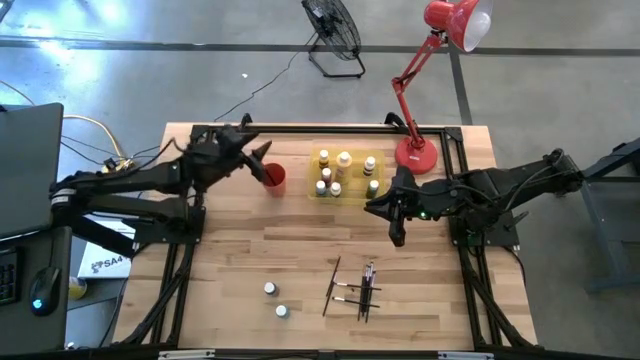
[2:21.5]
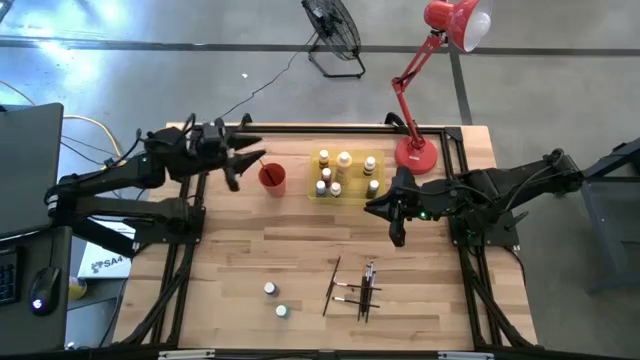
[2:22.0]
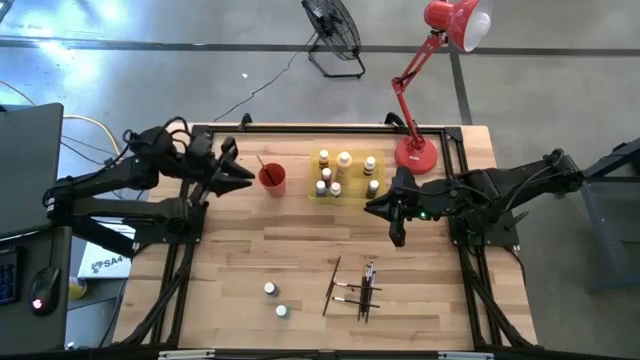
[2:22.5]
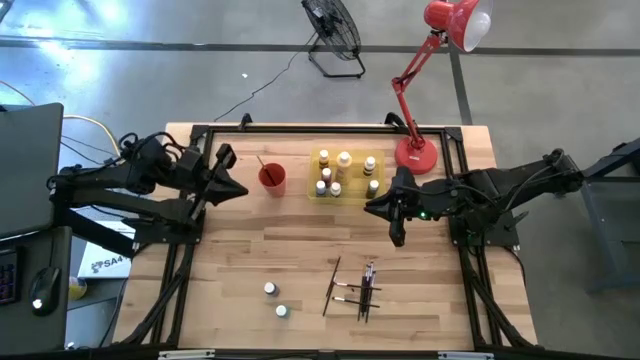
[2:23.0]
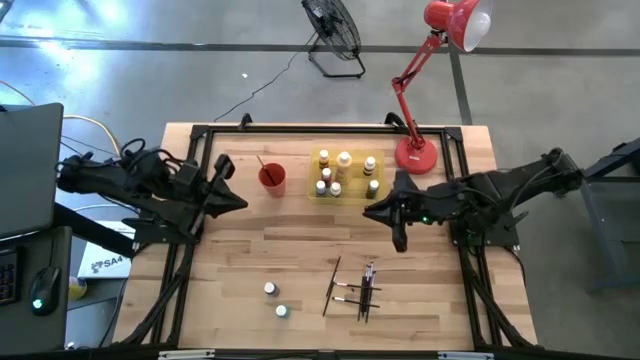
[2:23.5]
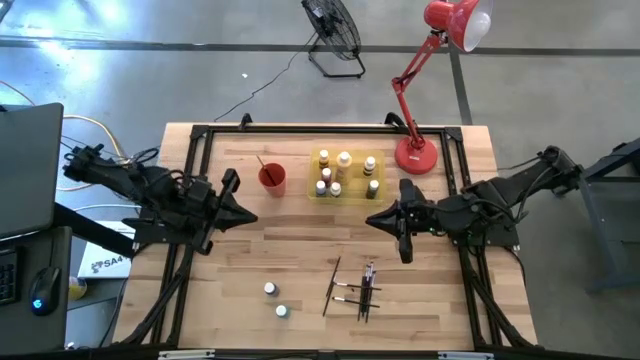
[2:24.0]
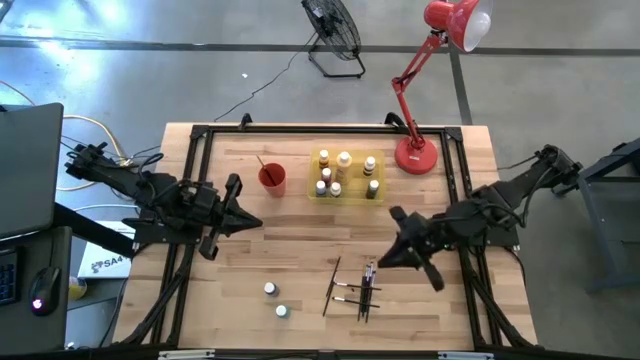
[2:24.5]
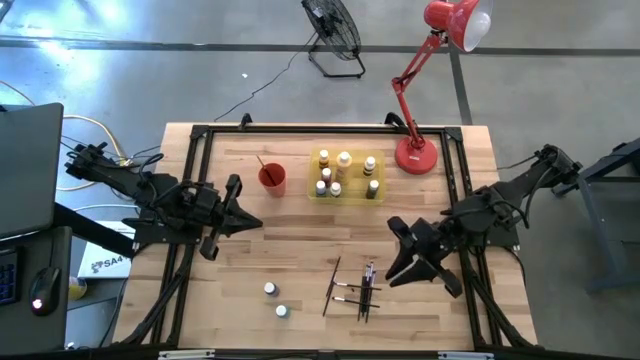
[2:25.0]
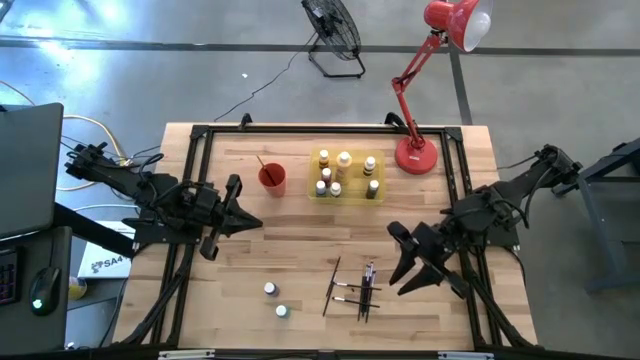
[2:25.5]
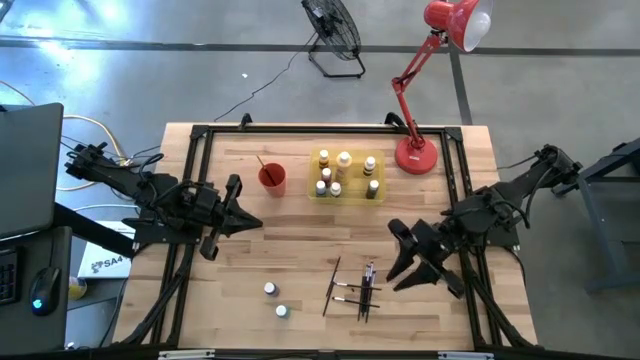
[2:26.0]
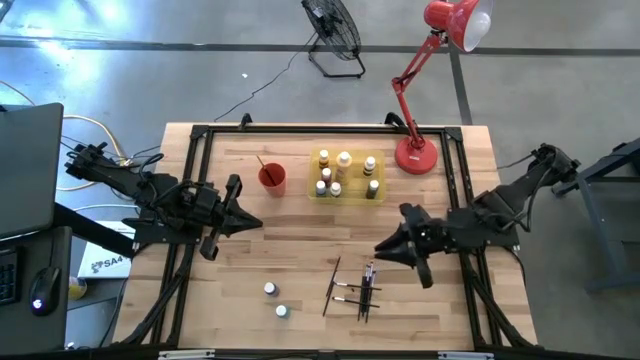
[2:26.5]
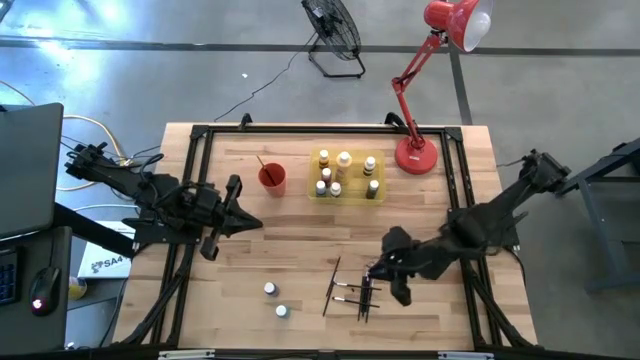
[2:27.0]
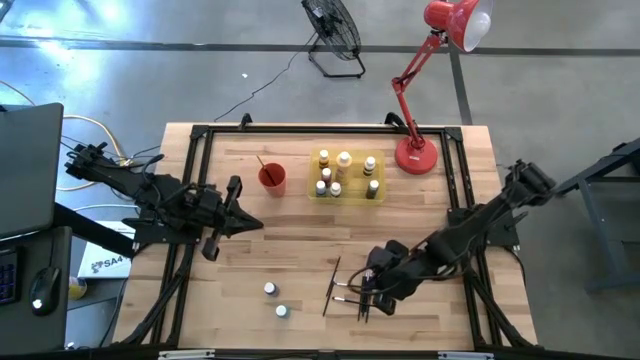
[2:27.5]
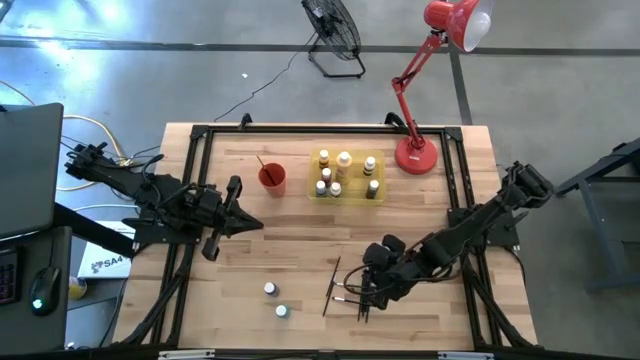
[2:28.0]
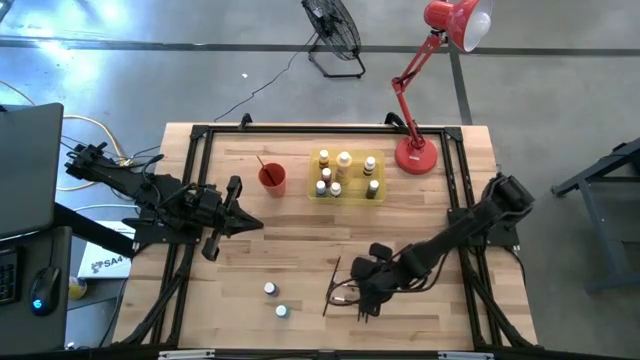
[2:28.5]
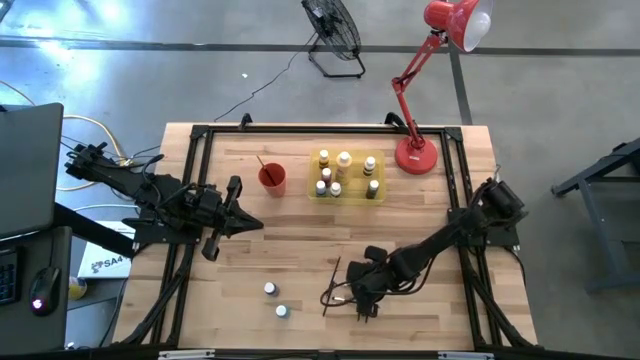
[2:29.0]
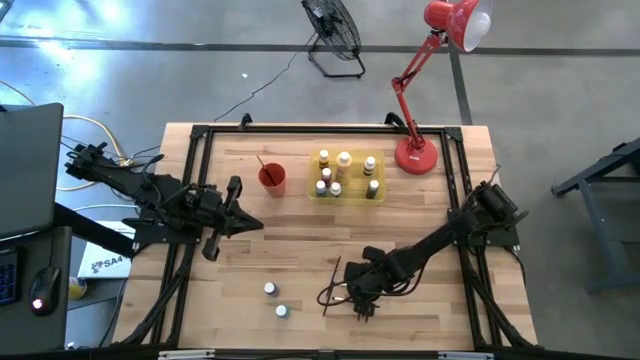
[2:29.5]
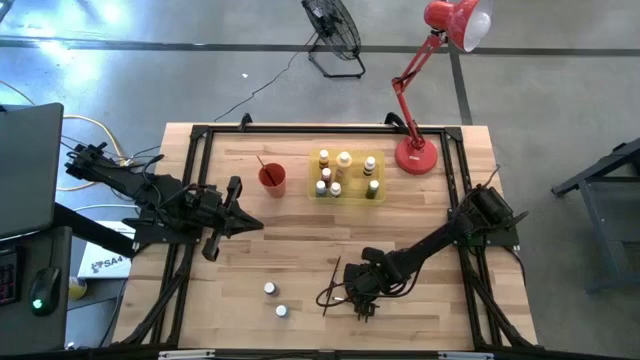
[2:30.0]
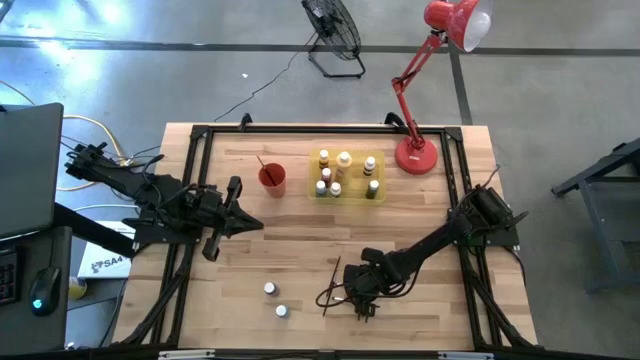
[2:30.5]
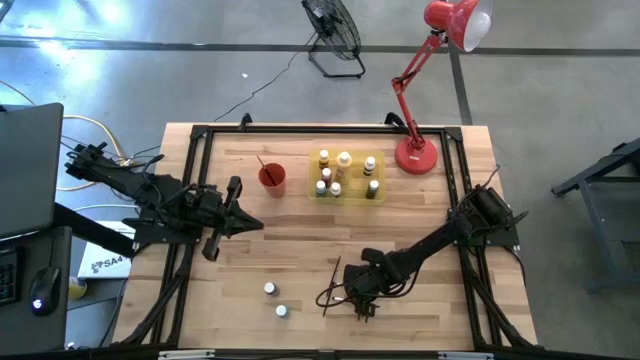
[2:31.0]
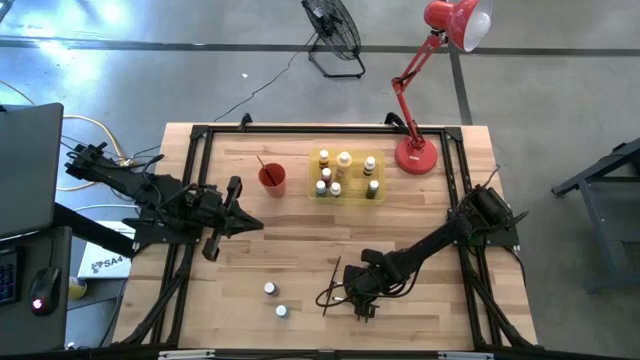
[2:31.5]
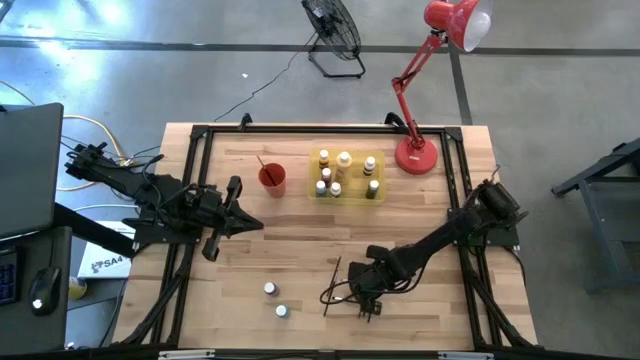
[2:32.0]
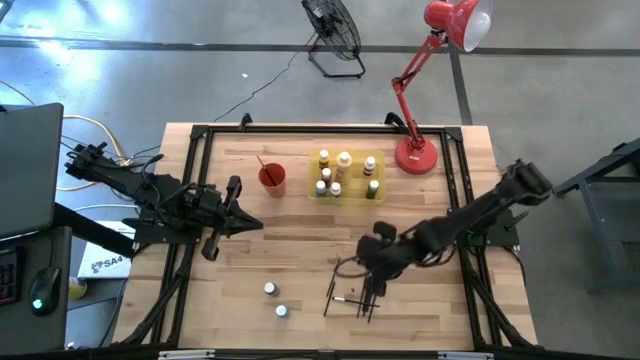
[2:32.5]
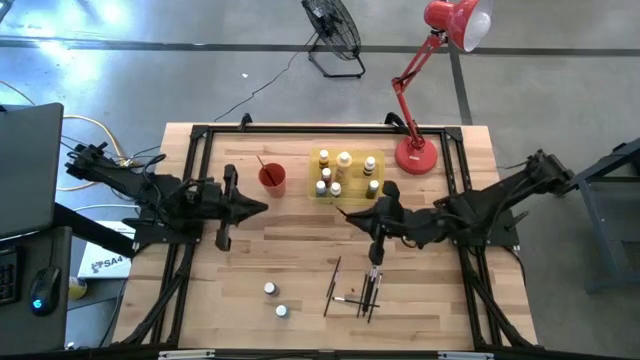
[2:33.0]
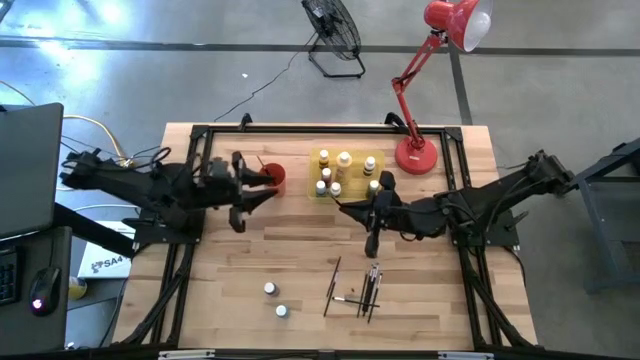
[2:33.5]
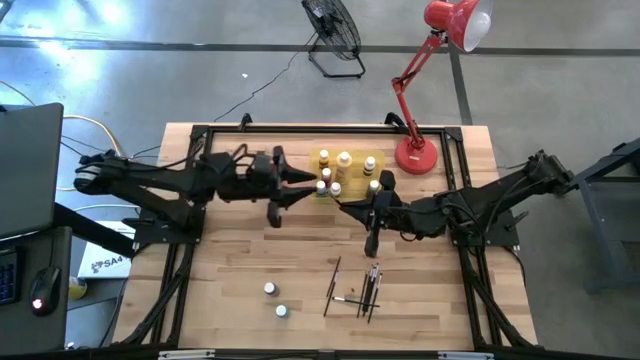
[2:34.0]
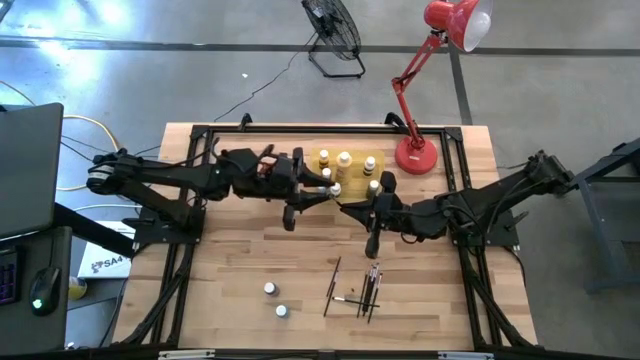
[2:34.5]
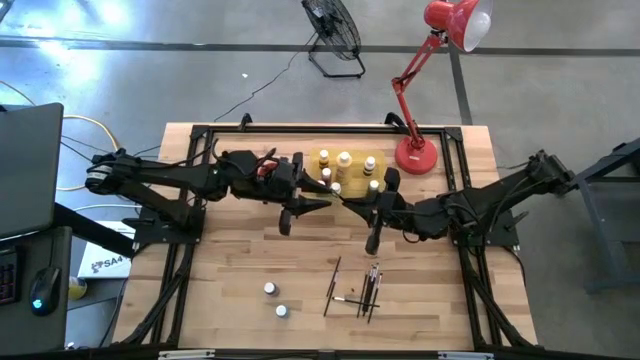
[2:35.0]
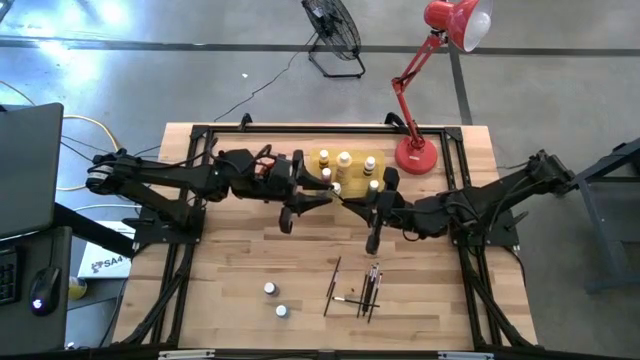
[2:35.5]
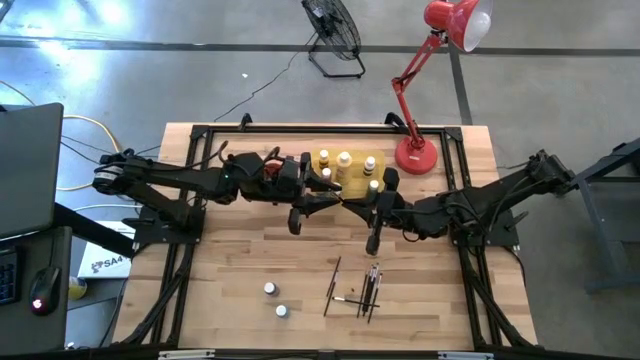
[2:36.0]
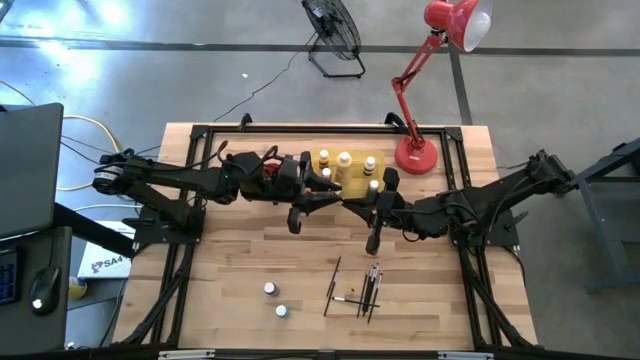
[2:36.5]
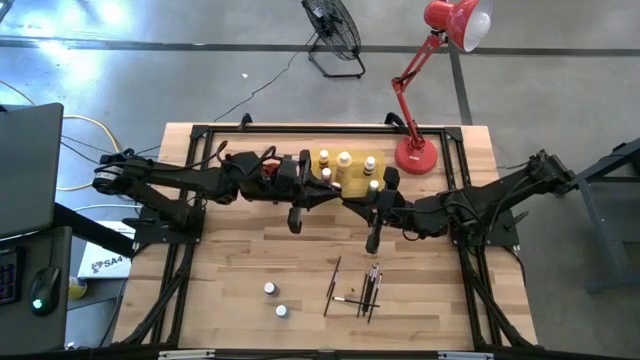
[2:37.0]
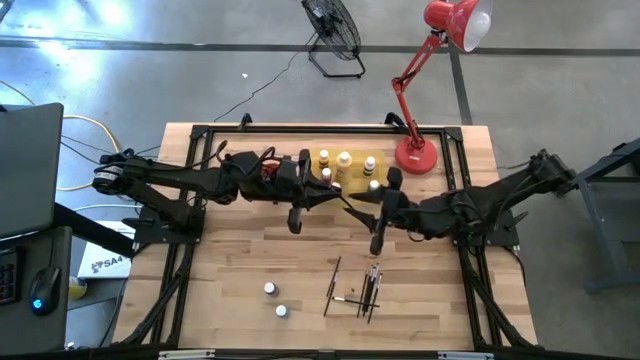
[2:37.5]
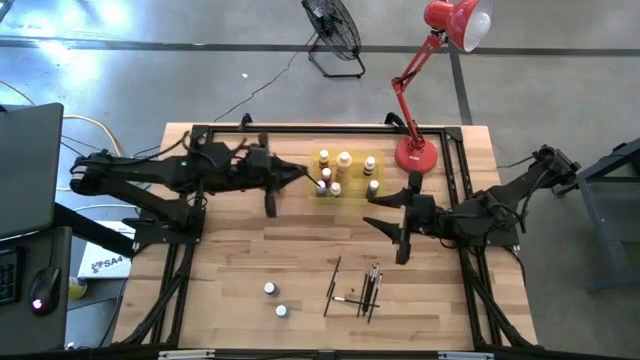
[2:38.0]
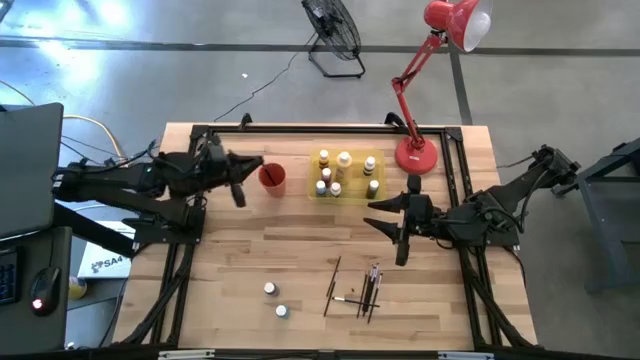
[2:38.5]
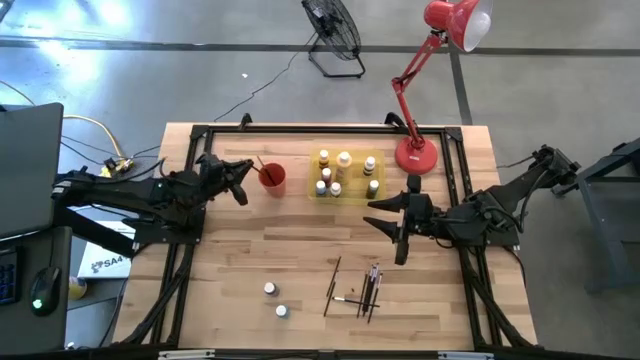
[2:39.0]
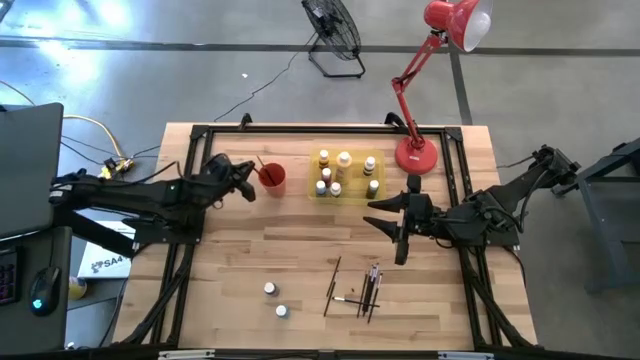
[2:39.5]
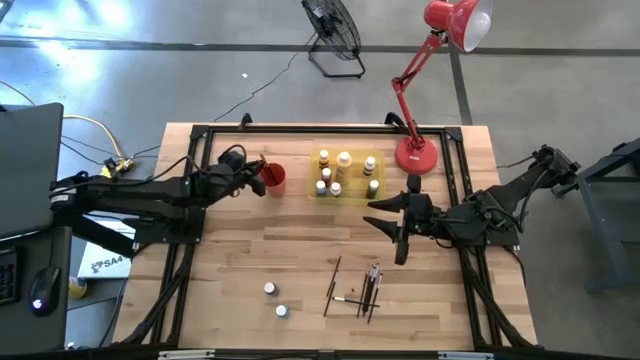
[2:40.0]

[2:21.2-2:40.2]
Task: Pick & Place Paint Supplies
Put the silver paintbrush into the orange cup

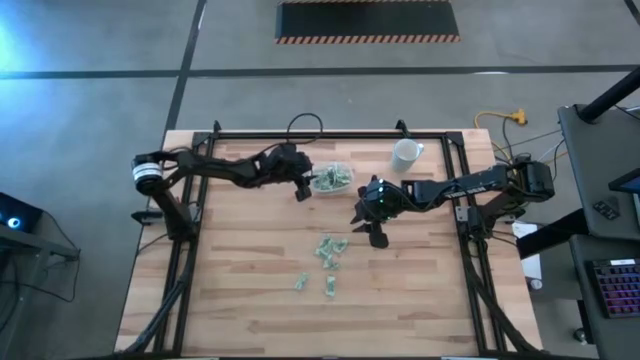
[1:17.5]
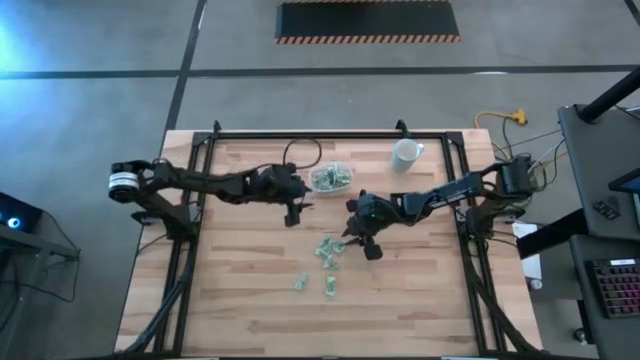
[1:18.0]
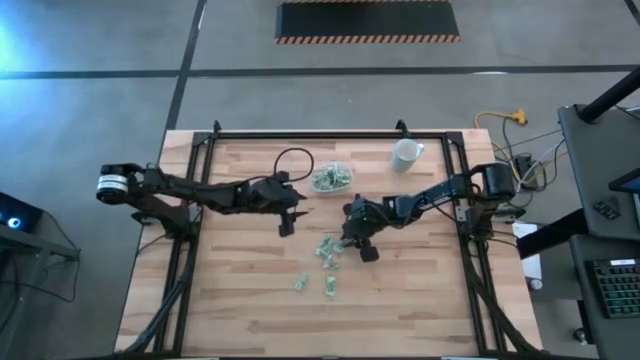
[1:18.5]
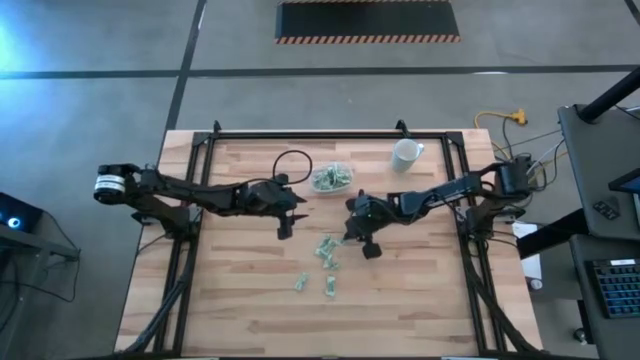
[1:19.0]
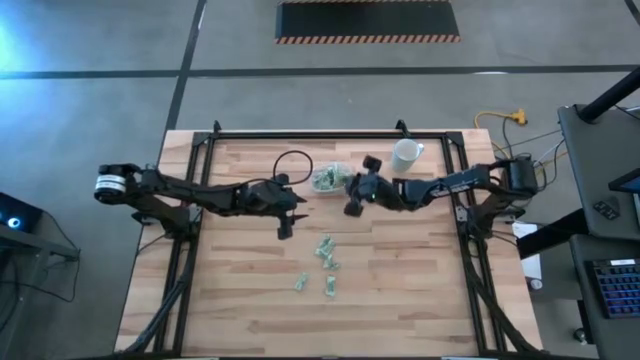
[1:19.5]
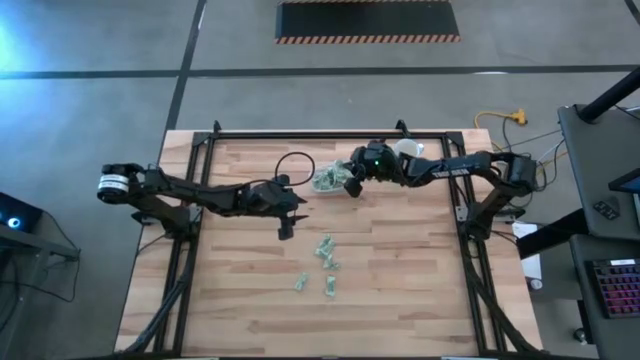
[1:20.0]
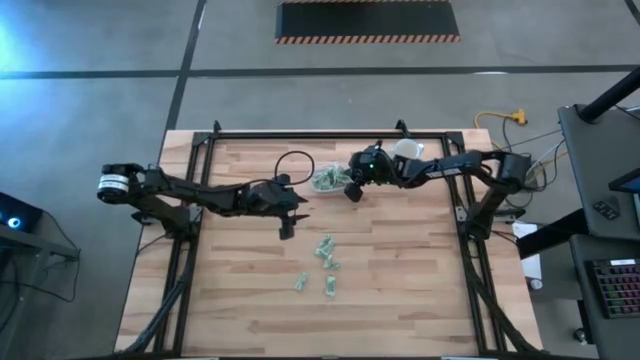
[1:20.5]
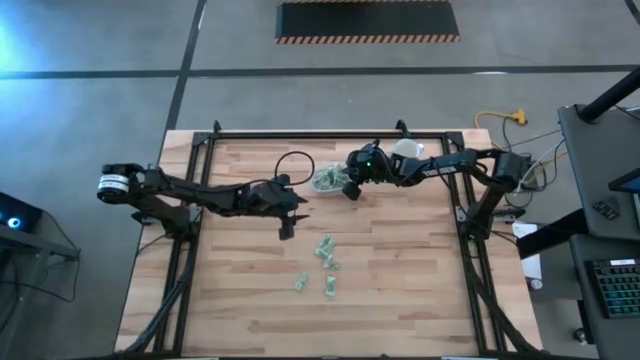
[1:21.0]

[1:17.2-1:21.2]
Task: Pick and place Stevia / Truvia into bins
Put the stevia packet into the transparent container
